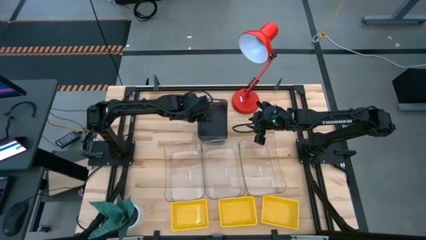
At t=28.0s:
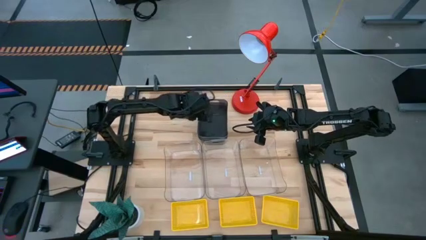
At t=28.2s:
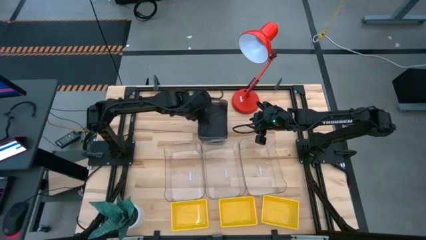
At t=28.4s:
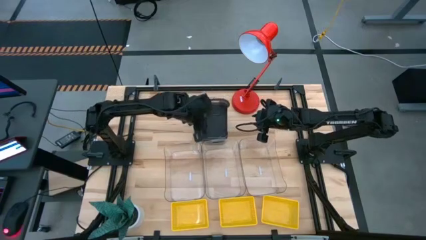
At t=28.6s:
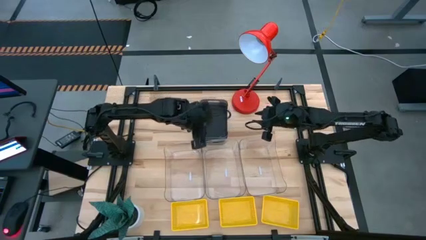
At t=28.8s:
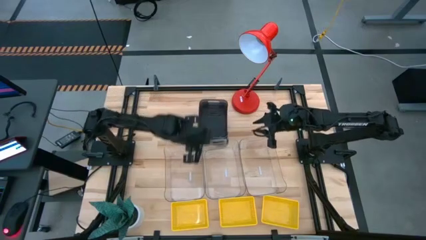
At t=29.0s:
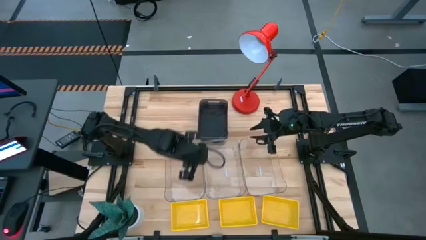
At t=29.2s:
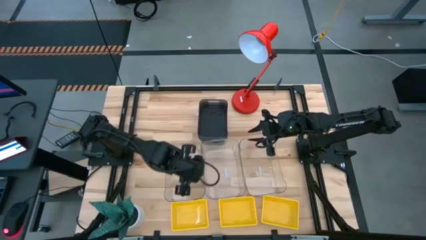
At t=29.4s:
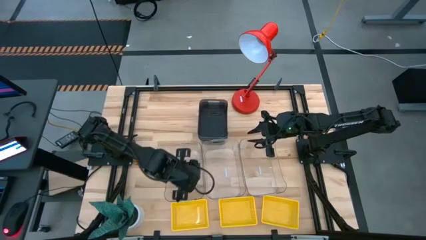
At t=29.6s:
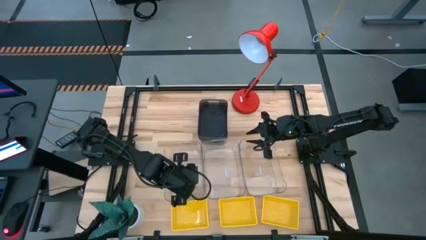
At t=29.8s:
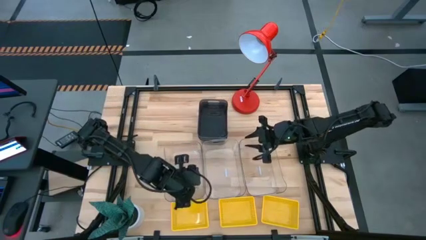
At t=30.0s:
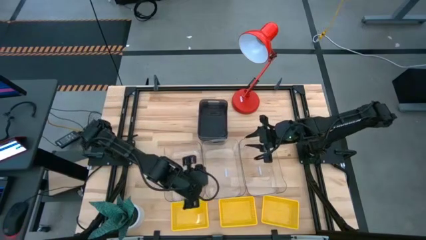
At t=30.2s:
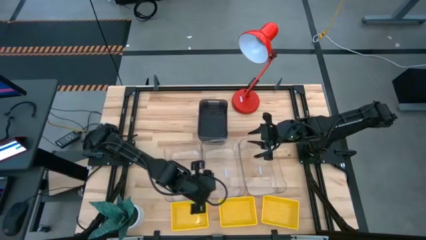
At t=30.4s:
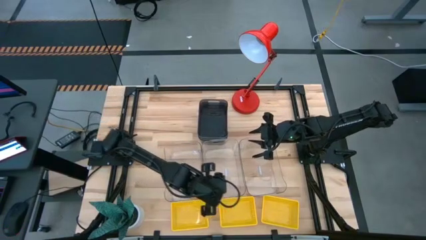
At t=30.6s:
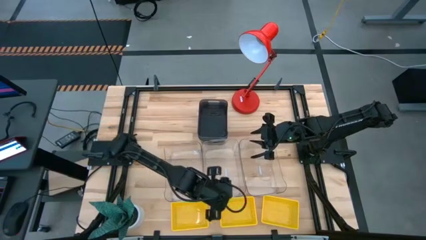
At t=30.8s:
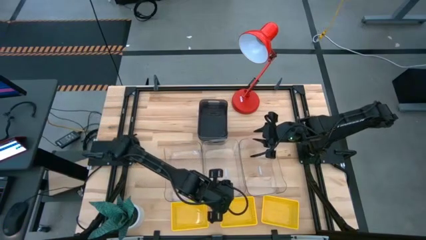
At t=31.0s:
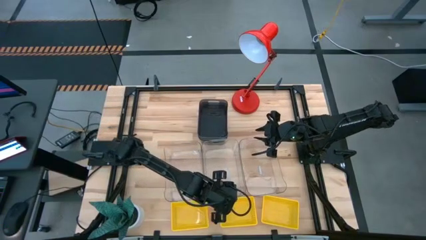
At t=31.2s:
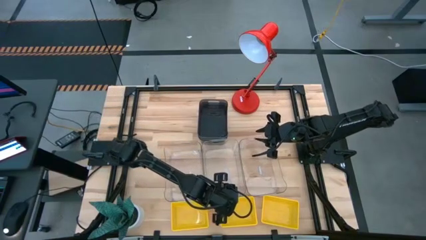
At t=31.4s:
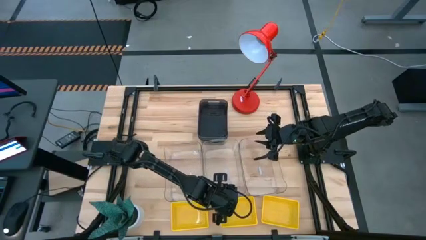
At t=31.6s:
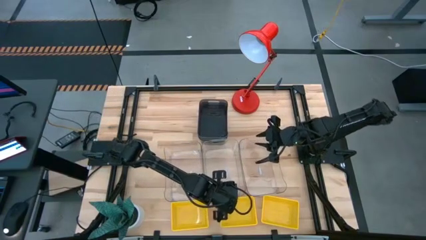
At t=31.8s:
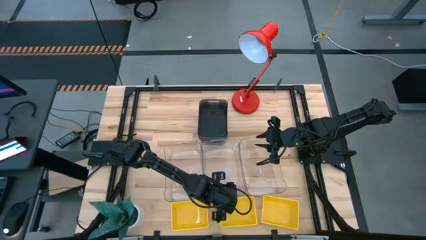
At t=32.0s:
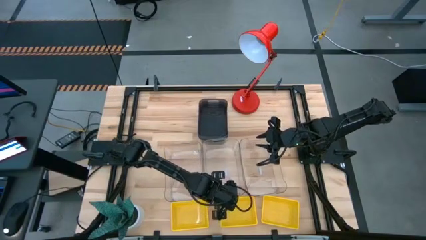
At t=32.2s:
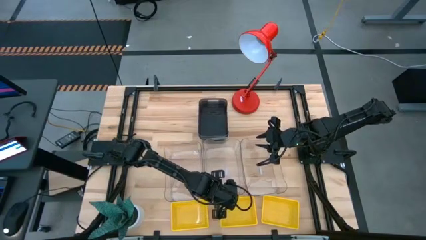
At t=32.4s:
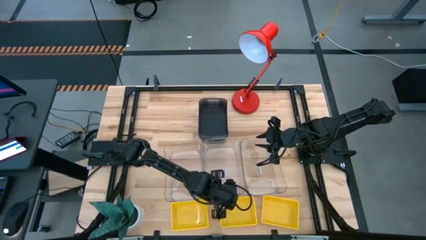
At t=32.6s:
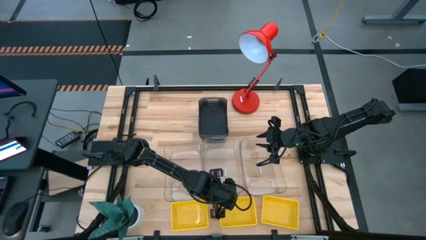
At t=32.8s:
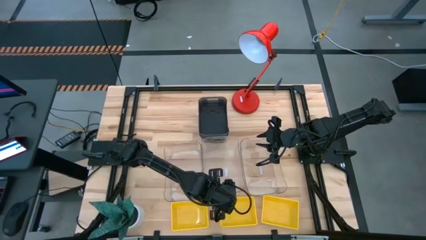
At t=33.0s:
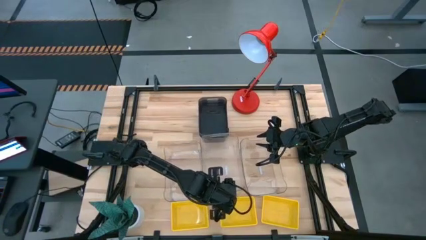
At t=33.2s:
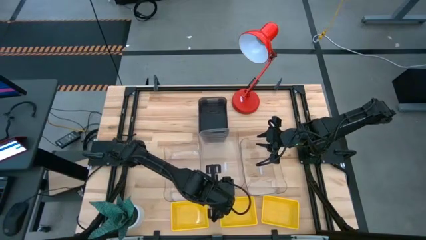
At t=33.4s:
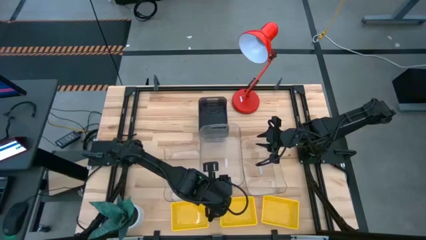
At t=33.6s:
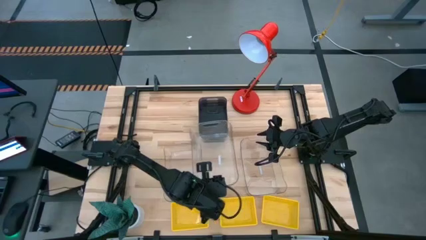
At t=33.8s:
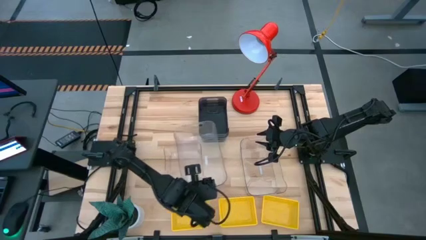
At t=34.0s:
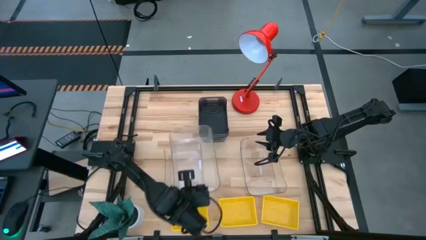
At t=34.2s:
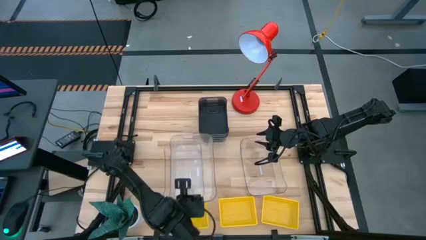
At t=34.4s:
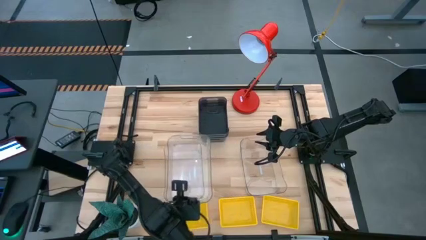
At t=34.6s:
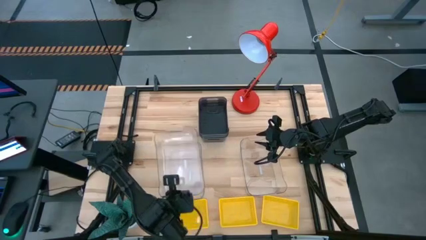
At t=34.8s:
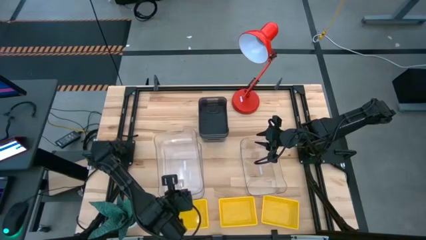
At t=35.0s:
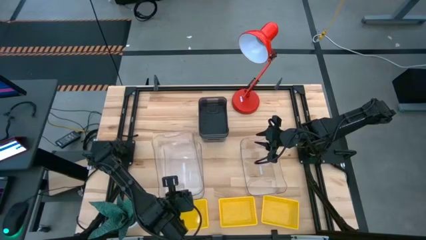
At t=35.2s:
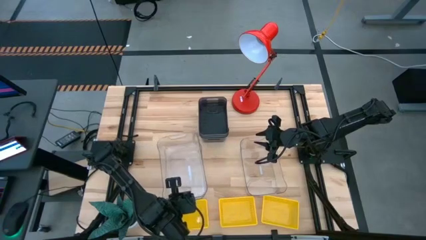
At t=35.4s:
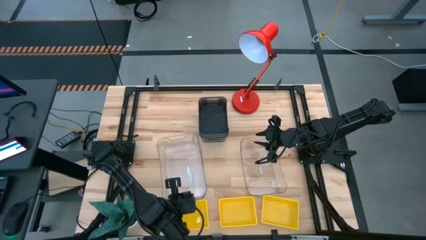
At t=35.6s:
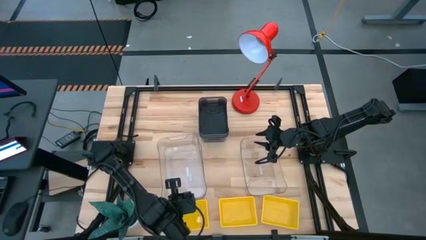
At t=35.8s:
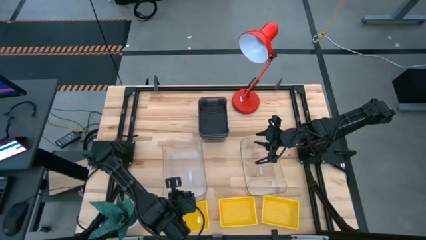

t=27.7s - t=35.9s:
Stack the middle transparent bin on top of the left transparent bin

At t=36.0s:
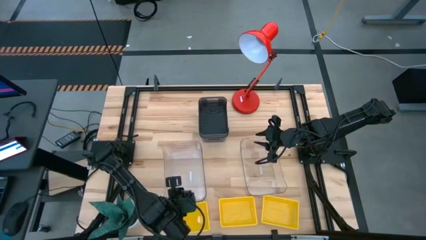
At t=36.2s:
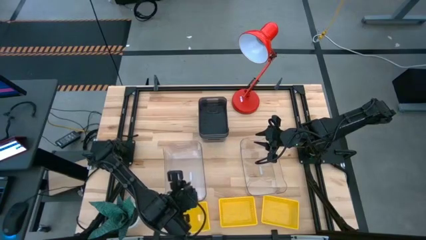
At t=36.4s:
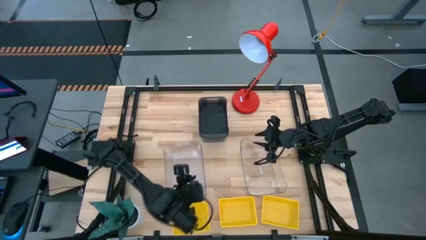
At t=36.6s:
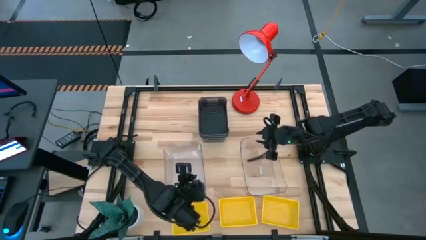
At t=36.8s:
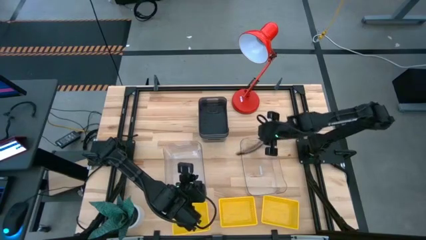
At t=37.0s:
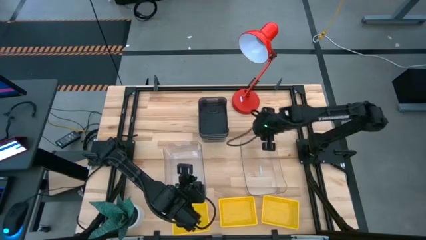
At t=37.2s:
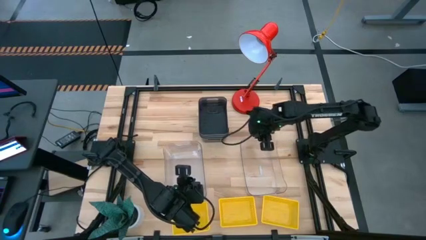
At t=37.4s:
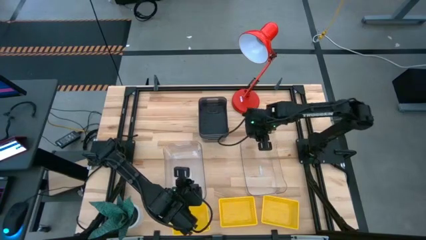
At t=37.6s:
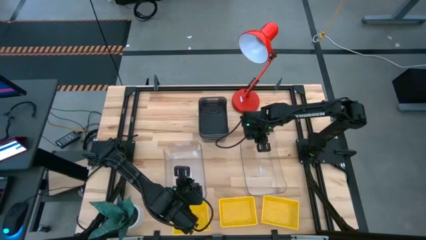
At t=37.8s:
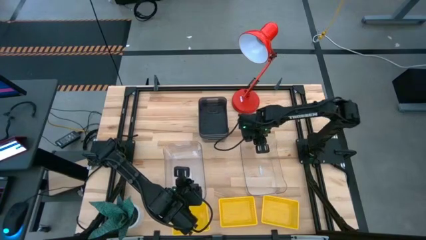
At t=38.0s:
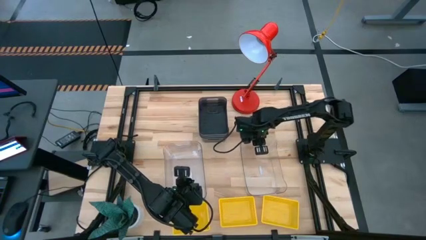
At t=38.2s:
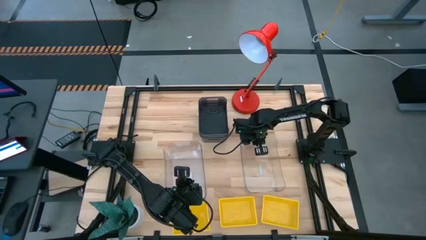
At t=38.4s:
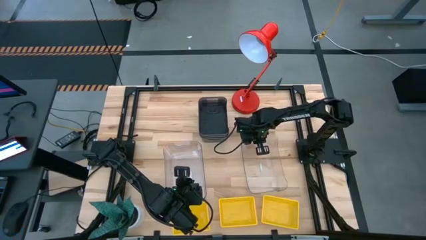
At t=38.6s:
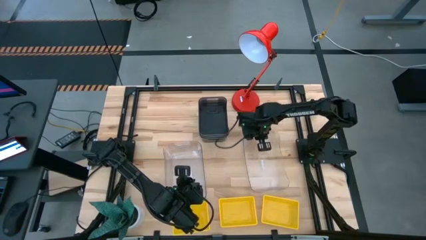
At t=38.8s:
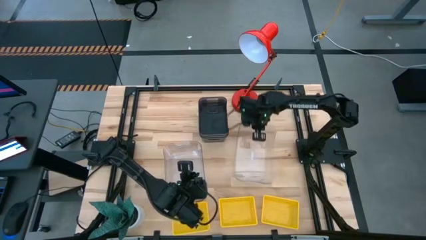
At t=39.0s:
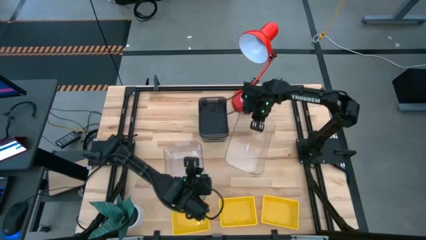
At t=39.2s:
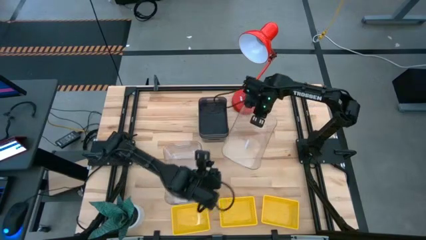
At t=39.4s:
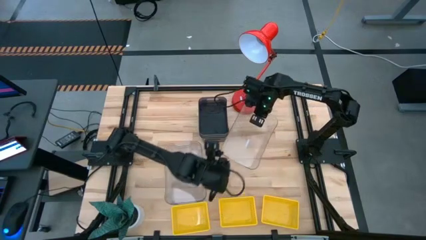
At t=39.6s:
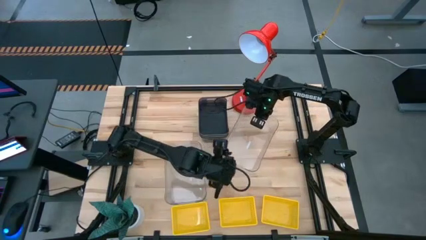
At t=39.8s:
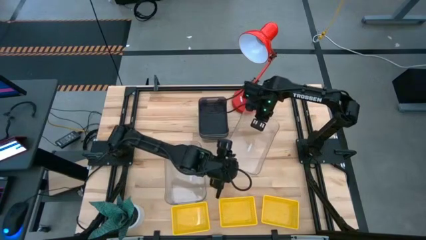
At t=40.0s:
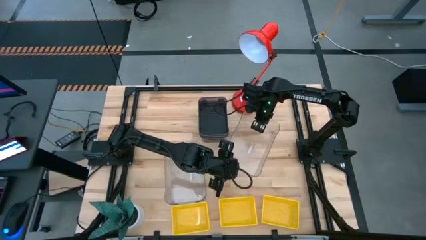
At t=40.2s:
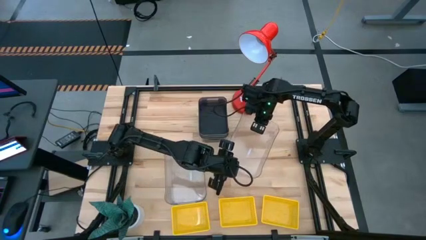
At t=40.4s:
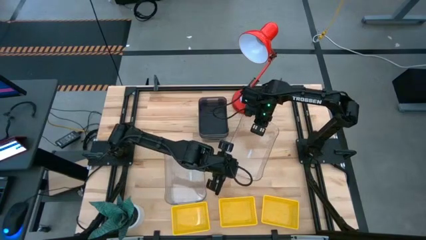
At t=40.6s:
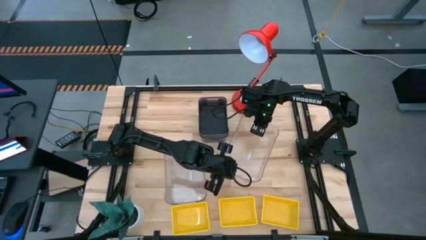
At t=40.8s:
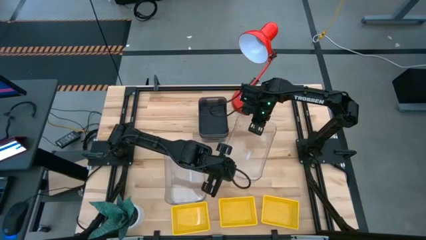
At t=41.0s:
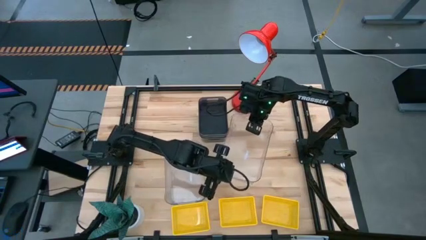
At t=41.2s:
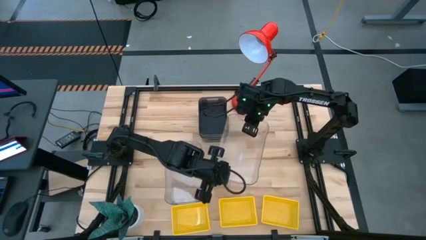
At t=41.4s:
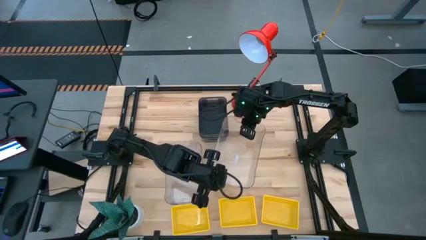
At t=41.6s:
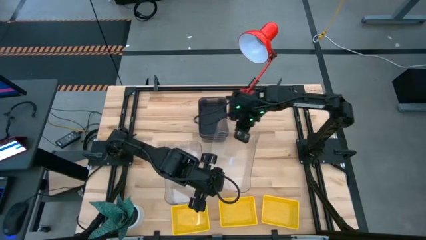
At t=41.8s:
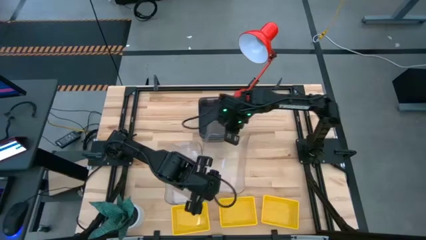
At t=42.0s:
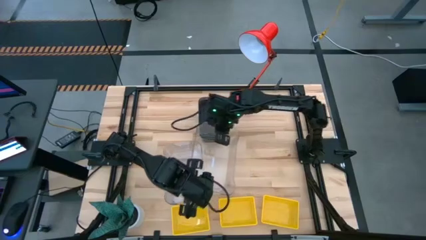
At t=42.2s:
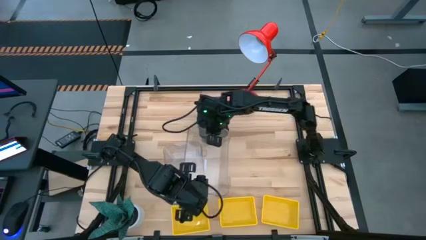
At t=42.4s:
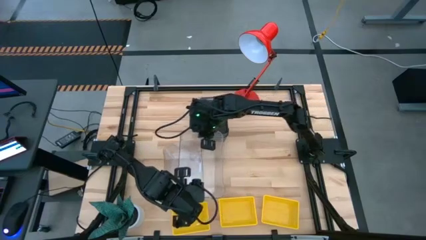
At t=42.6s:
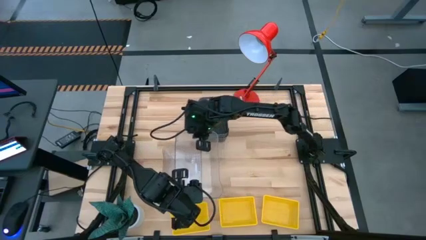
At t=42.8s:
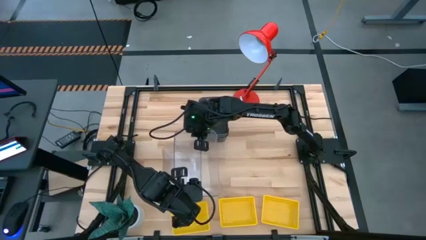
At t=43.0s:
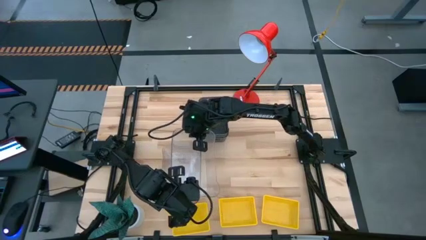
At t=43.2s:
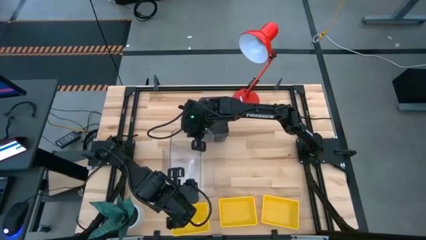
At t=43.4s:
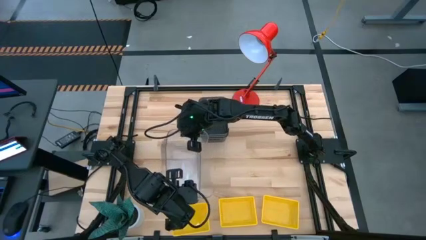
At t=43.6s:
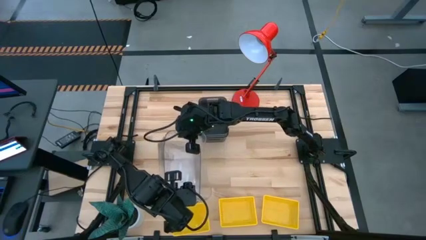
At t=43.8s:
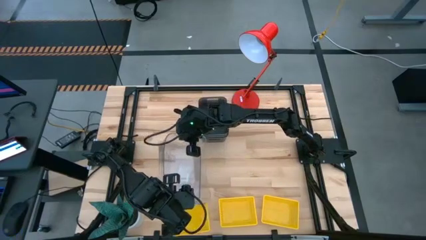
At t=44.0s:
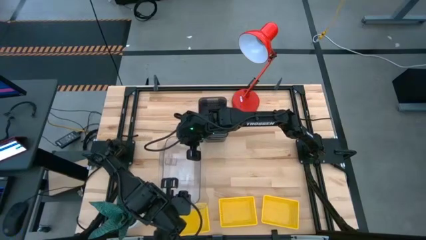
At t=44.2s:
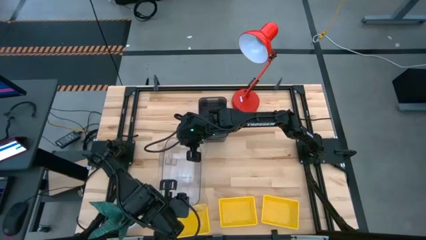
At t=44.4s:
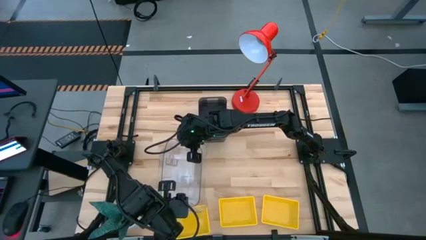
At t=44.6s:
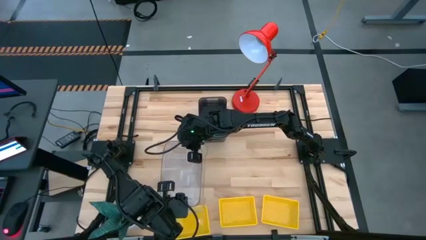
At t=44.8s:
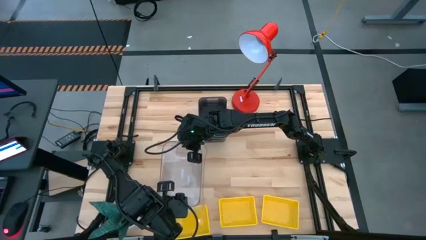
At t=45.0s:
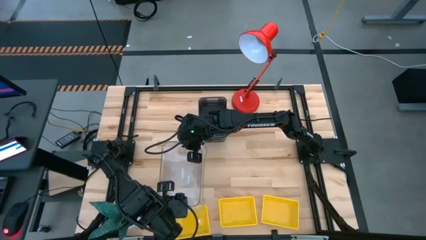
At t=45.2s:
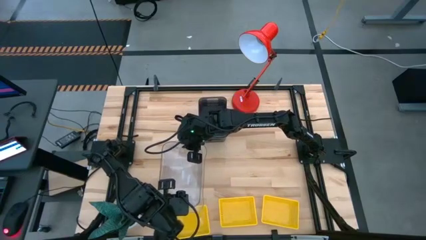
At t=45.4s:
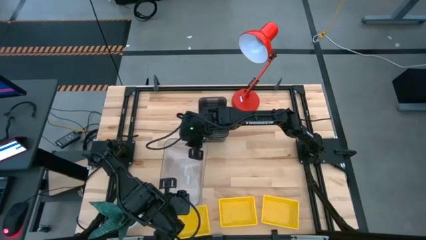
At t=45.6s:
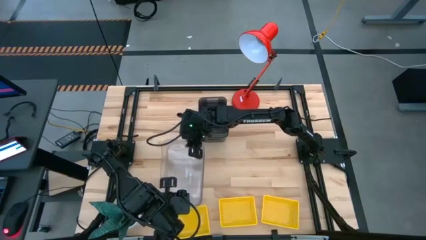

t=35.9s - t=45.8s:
Stack the right transparent bin on top of the left transparent bins
